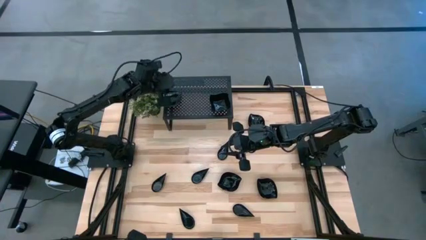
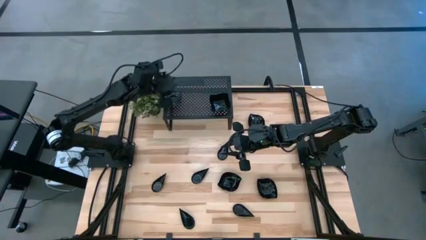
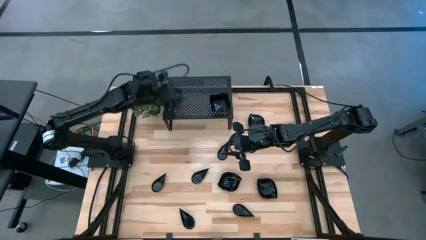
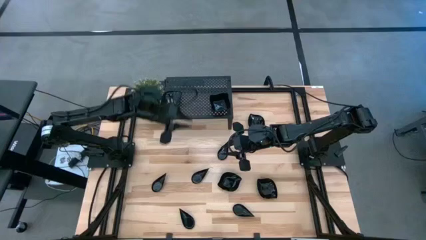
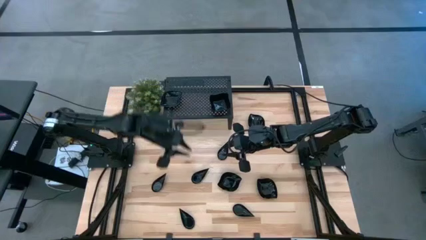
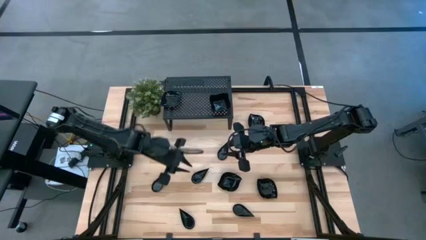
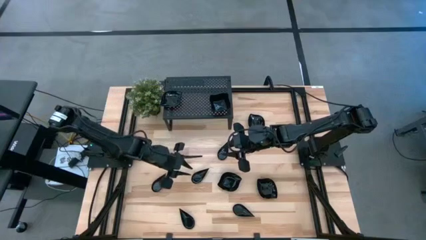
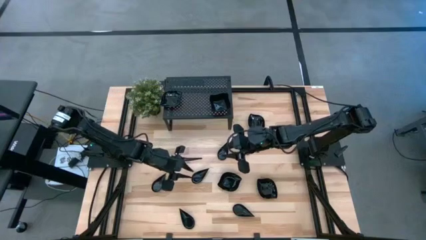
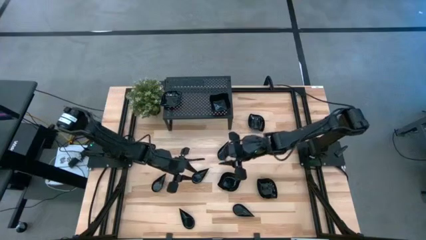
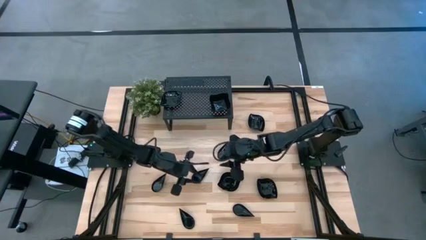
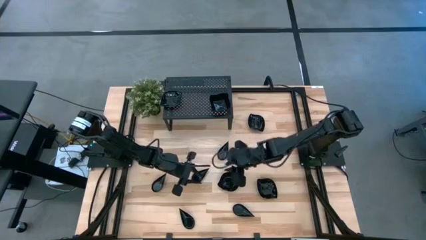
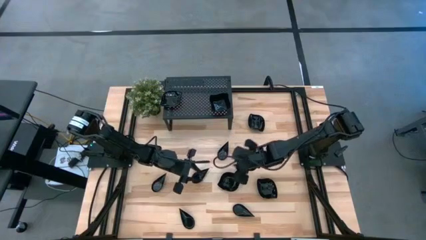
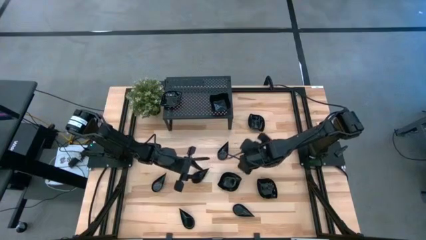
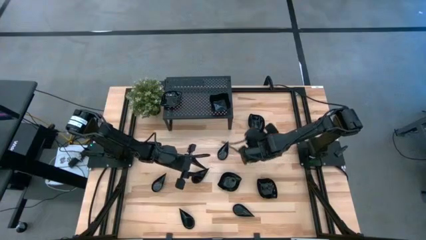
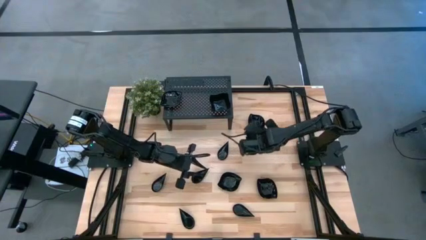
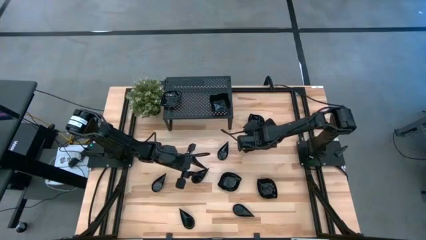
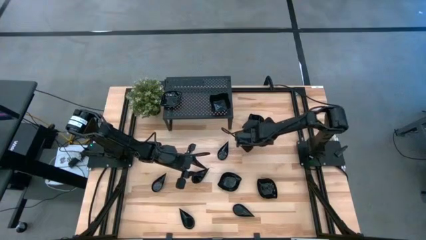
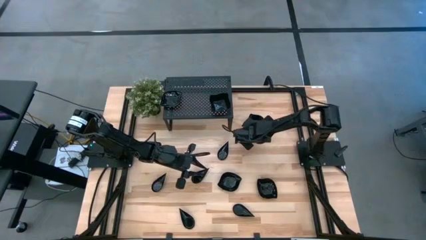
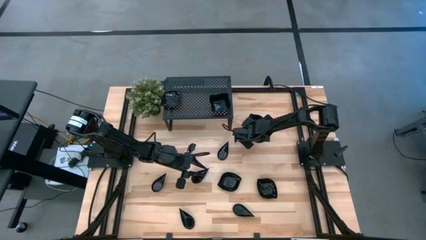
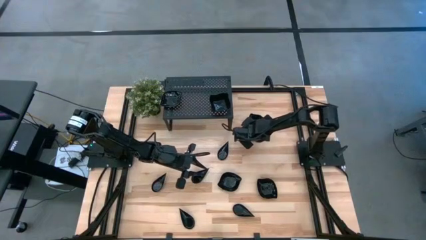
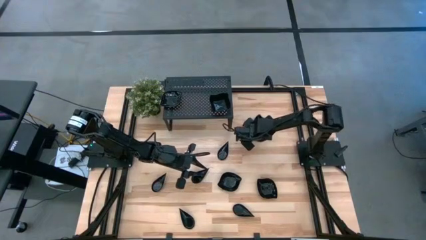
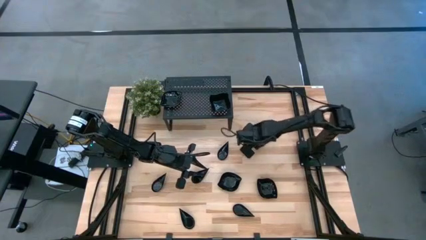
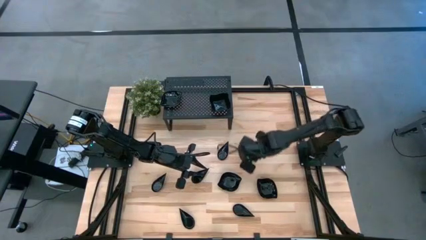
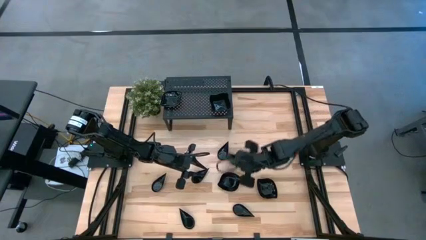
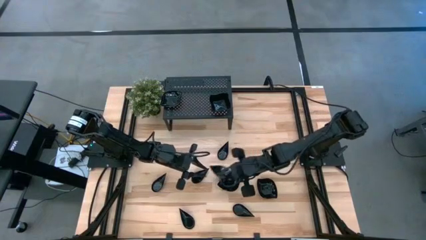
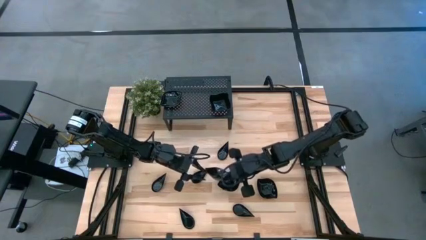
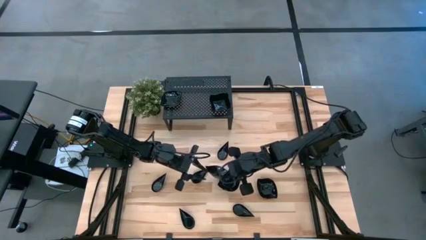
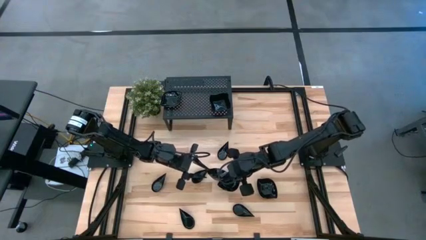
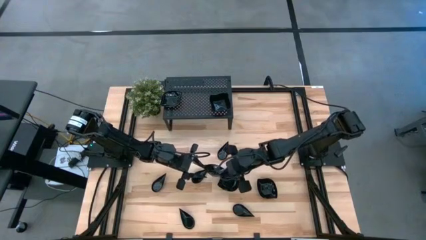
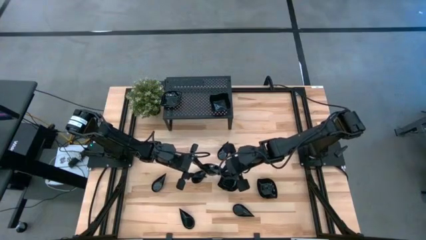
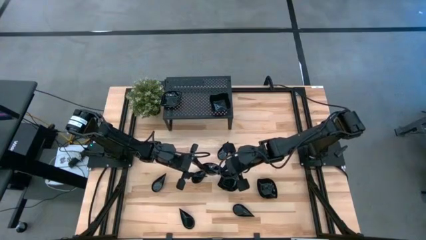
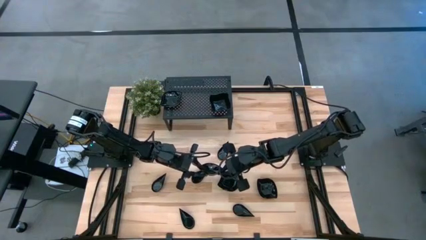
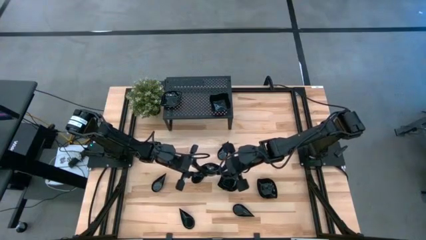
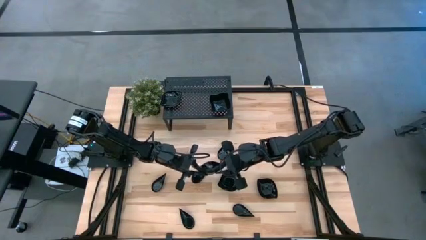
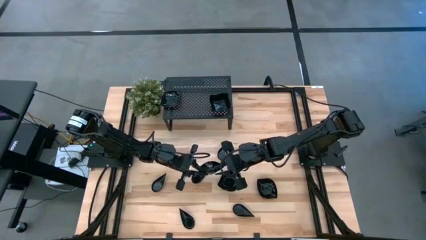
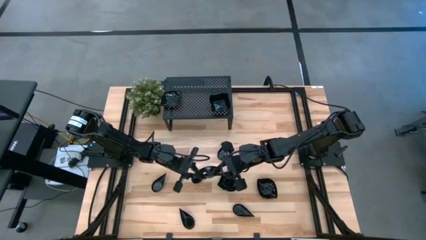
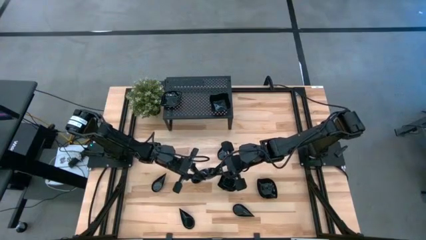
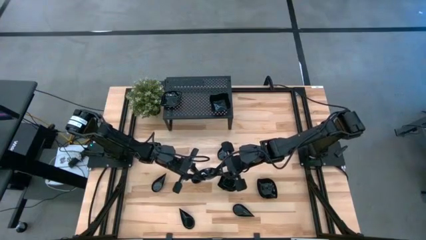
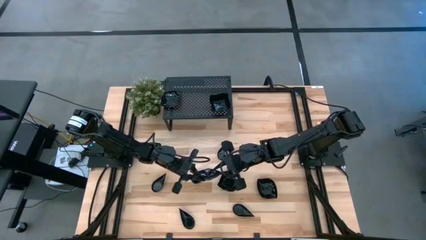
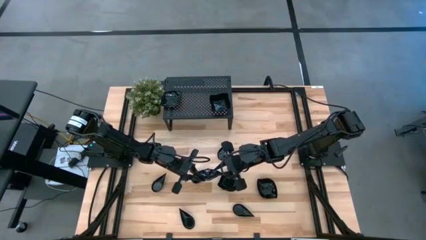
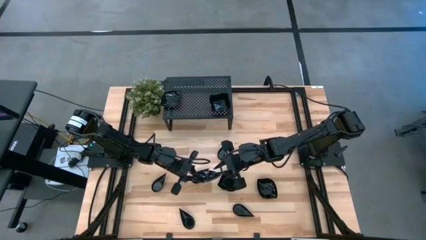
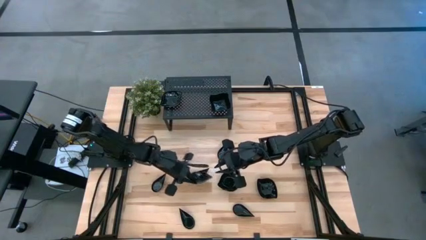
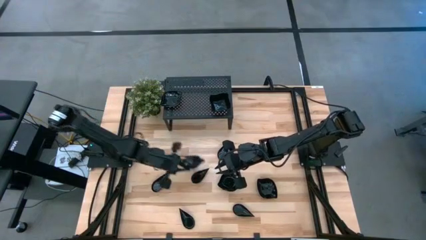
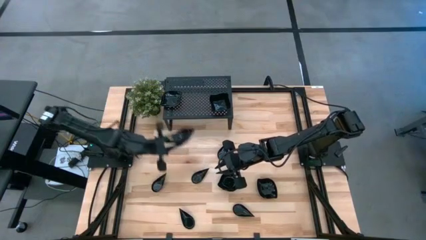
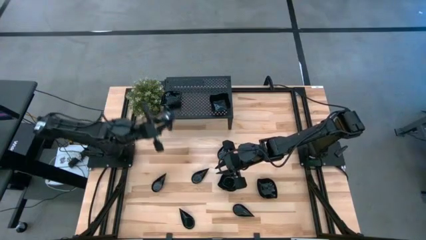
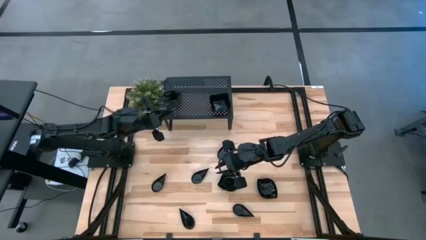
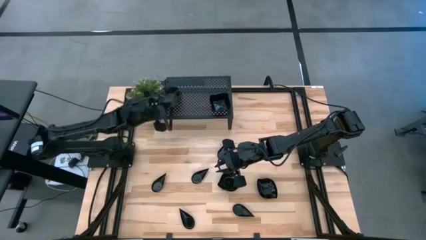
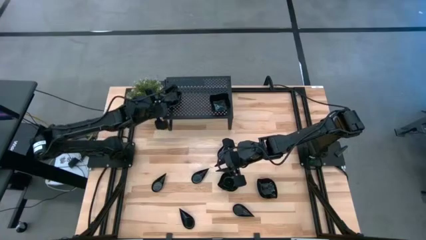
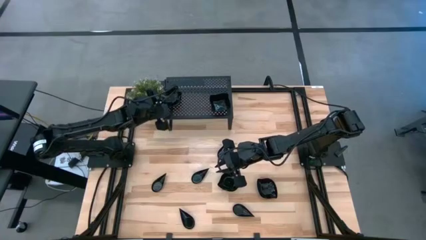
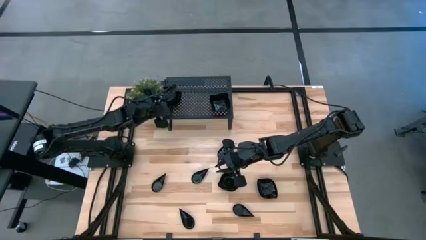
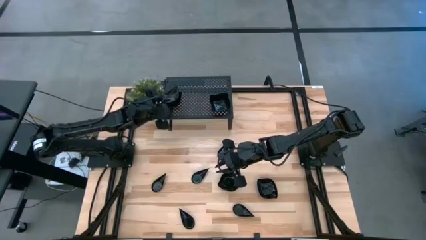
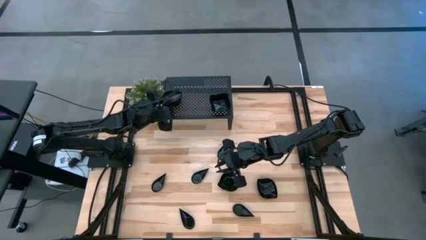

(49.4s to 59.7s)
Task: Pick & Place Mini shaped plates
Stack the black leaf-shaped plate on top of the black leaf-shaped plate on the shelf

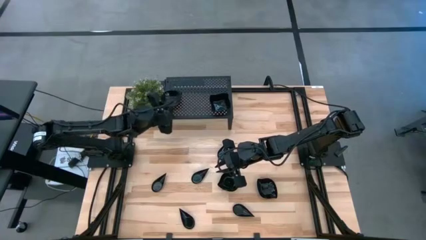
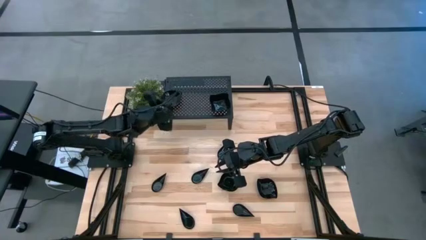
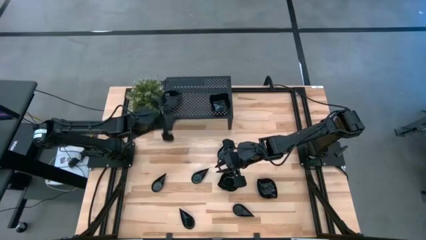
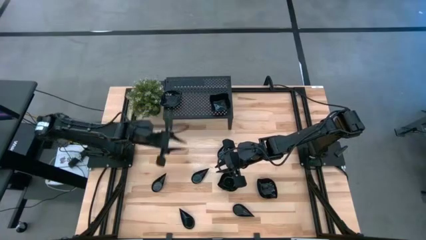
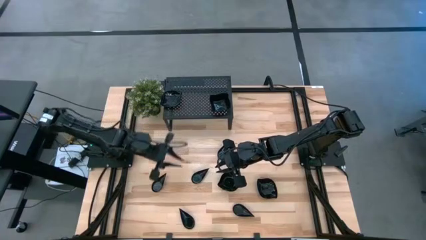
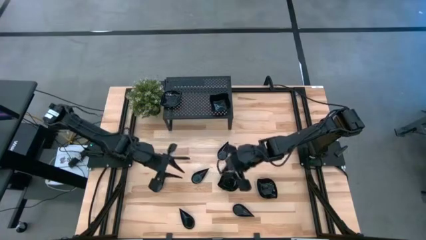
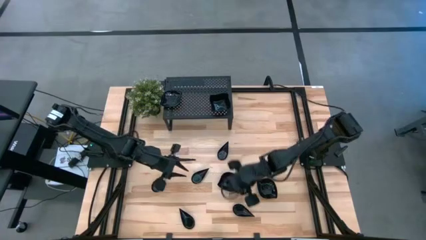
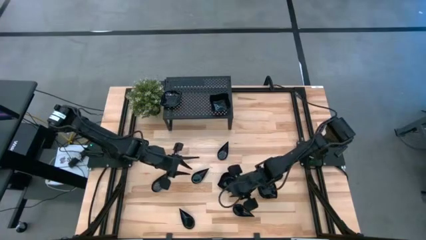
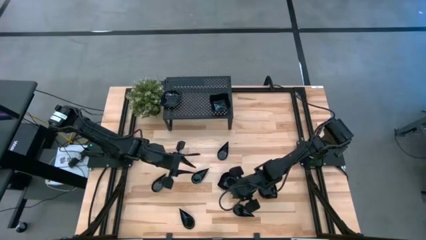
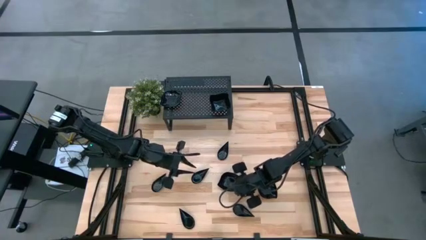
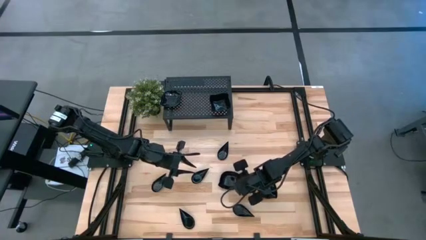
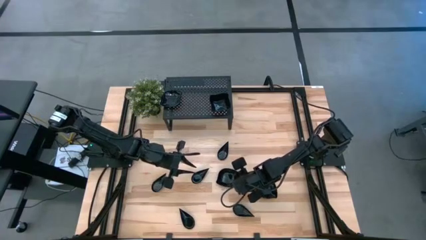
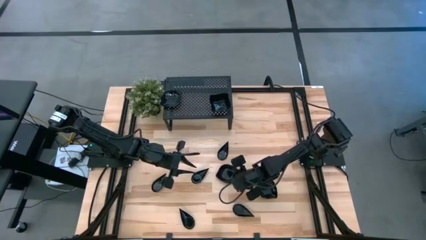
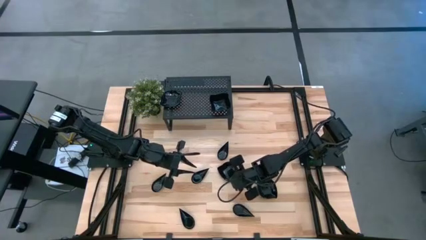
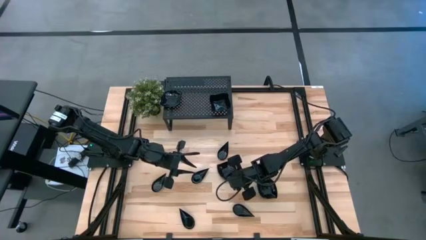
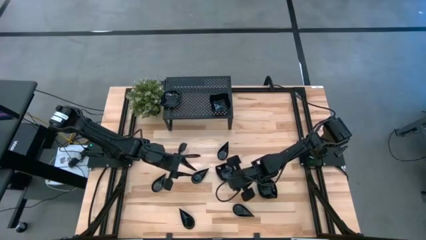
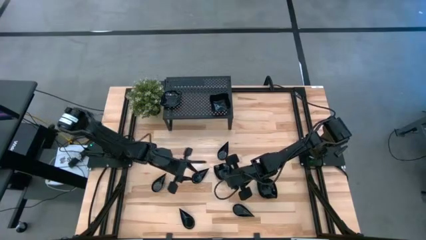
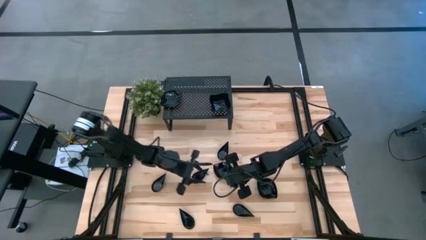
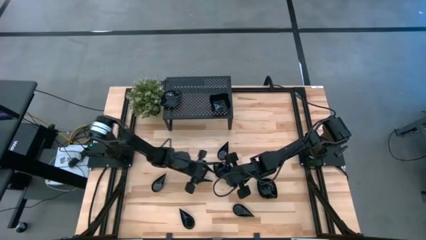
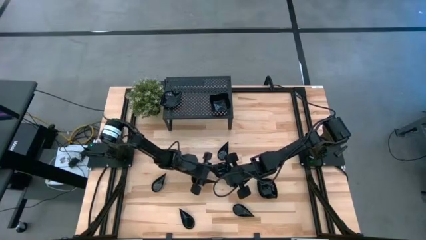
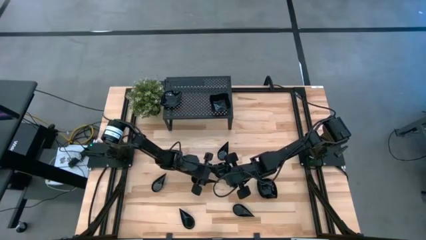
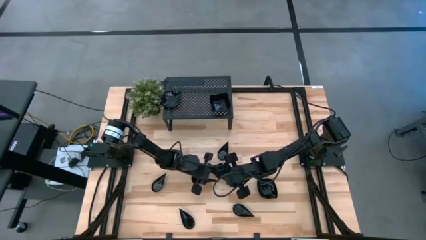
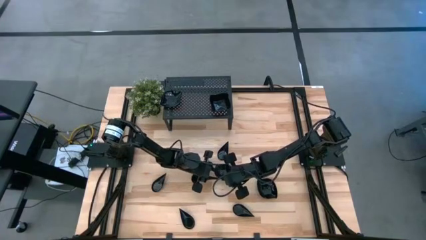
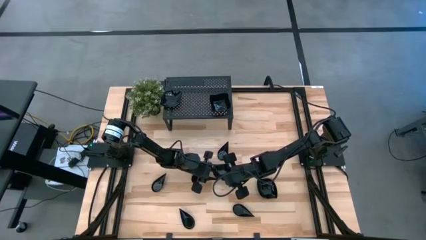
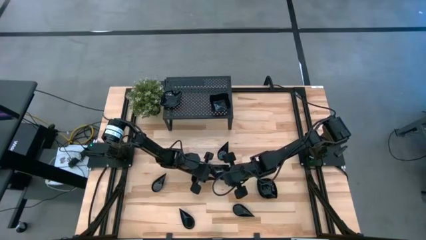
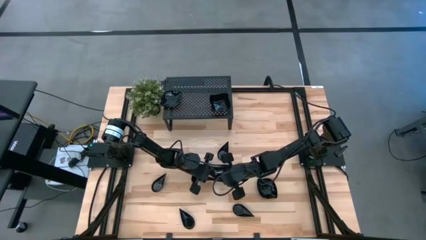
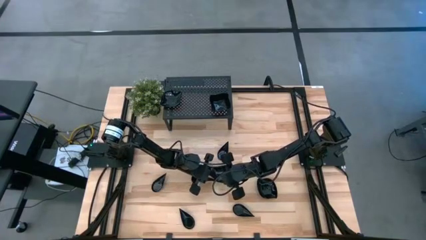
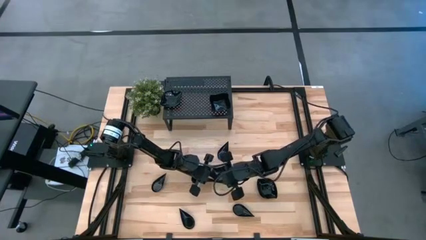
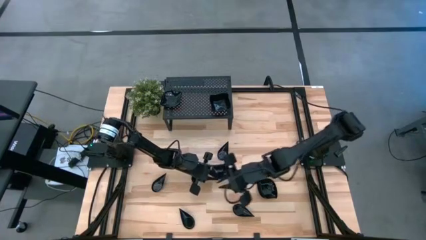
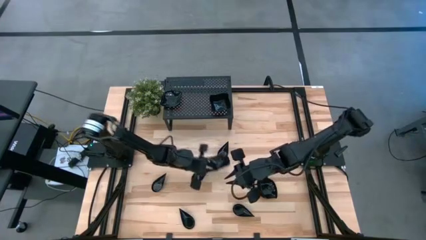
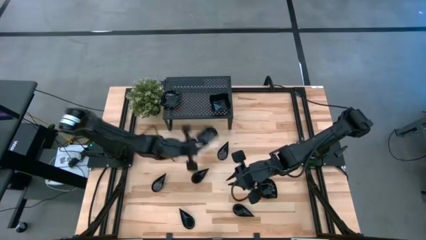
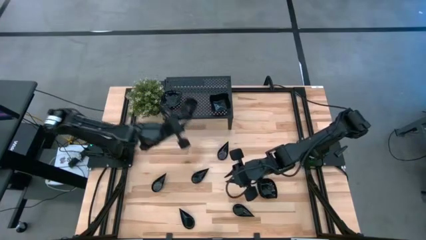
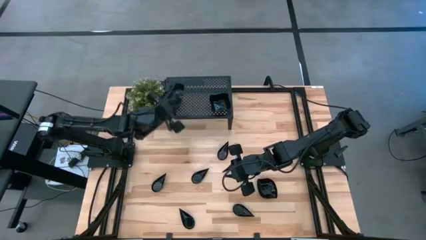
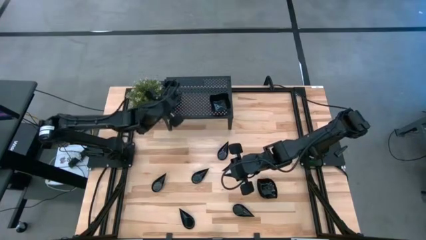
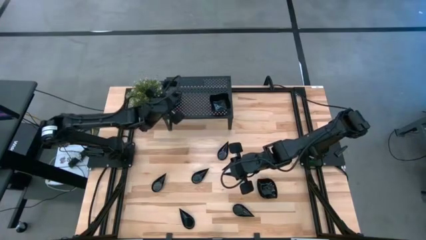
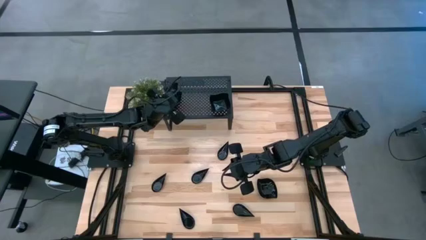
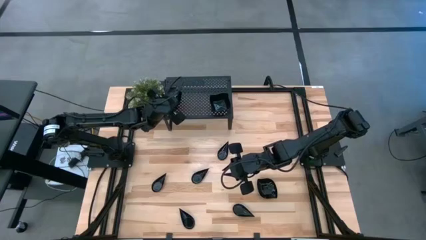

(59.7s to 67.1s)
Stack the black leaf-shaped plate on top of the black leaf-shaped plate on the shelf
